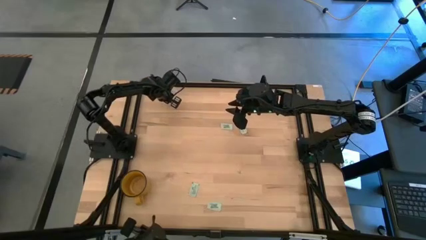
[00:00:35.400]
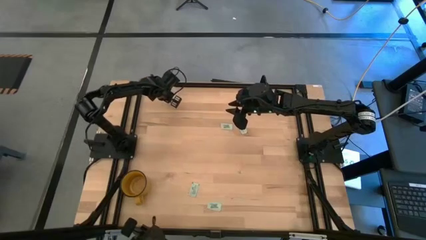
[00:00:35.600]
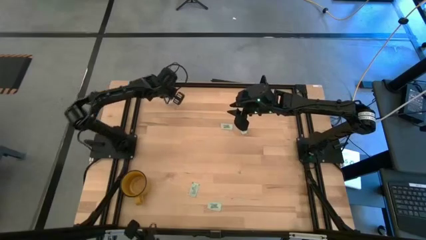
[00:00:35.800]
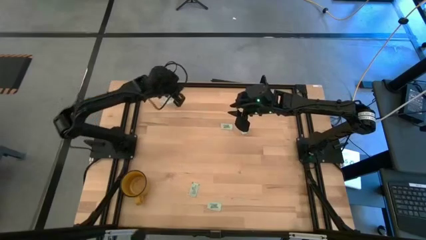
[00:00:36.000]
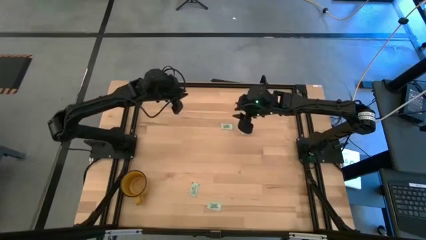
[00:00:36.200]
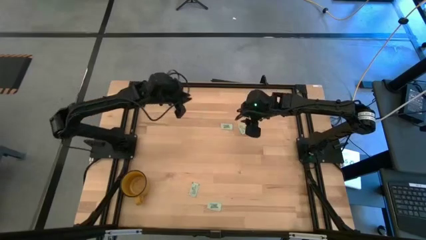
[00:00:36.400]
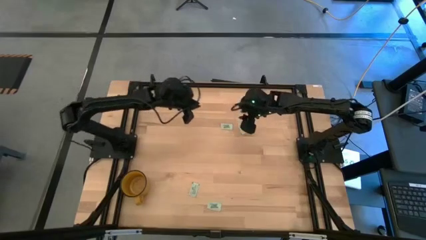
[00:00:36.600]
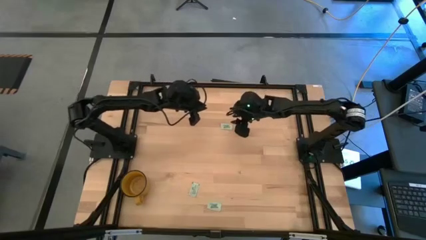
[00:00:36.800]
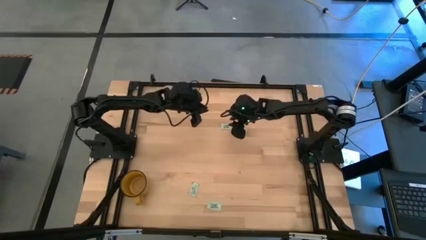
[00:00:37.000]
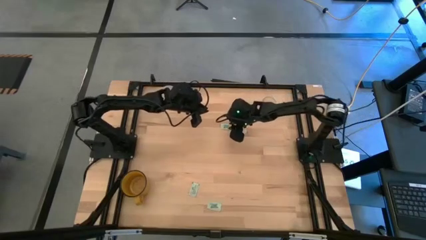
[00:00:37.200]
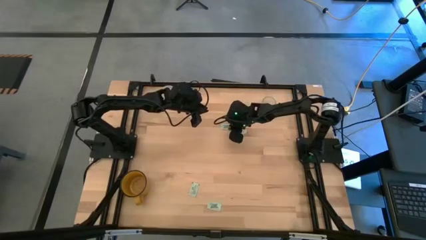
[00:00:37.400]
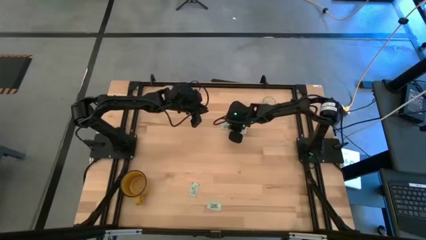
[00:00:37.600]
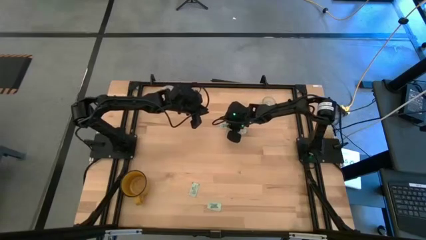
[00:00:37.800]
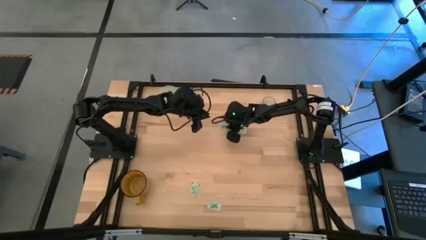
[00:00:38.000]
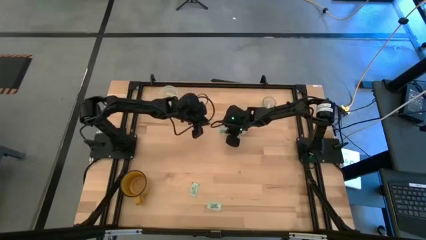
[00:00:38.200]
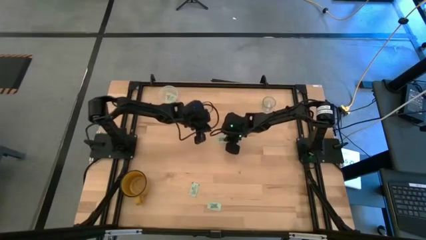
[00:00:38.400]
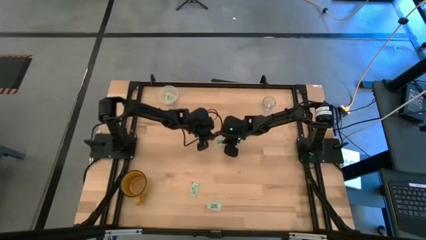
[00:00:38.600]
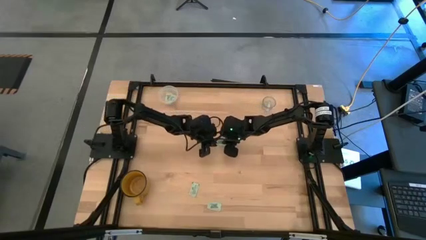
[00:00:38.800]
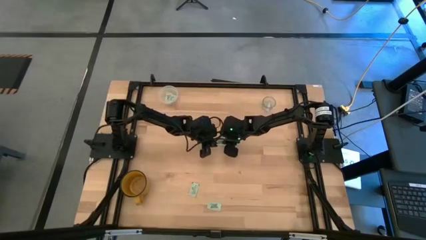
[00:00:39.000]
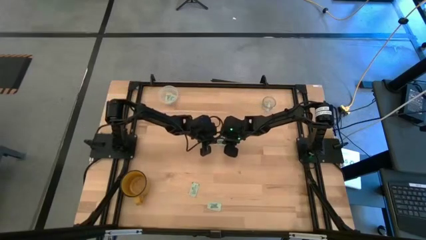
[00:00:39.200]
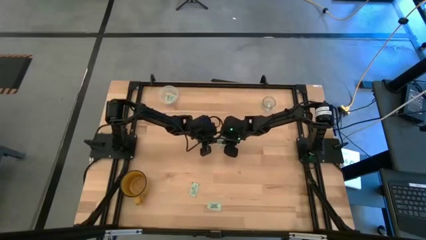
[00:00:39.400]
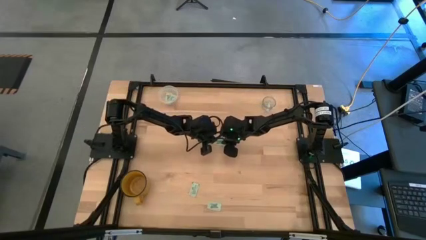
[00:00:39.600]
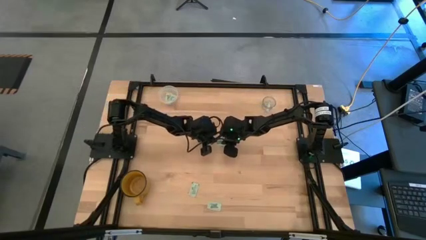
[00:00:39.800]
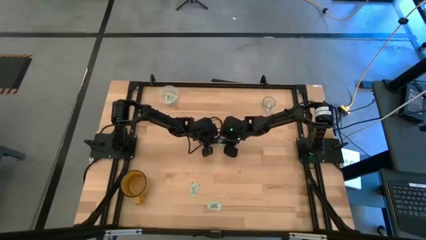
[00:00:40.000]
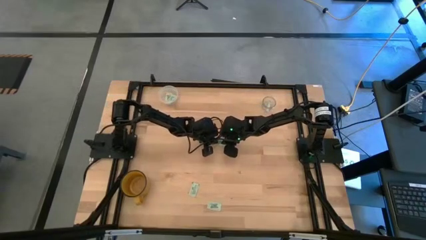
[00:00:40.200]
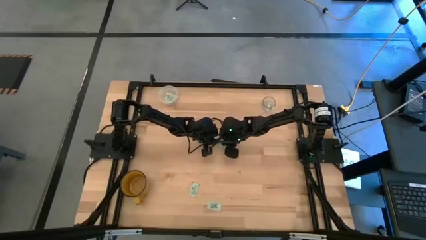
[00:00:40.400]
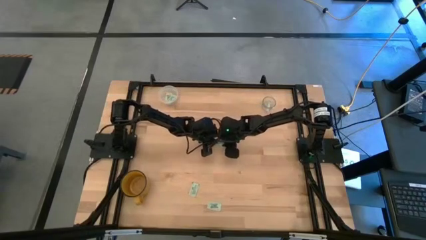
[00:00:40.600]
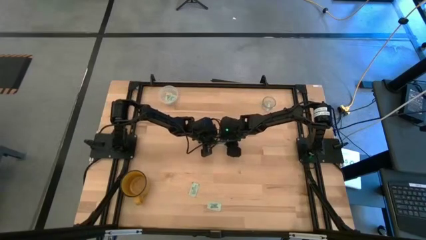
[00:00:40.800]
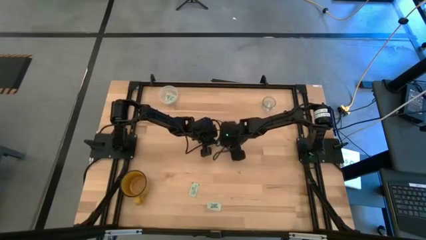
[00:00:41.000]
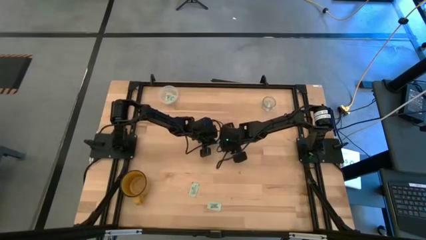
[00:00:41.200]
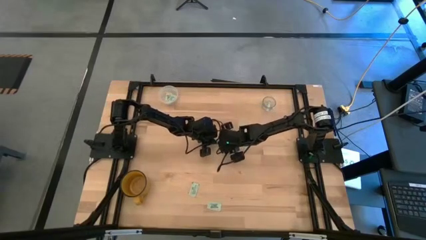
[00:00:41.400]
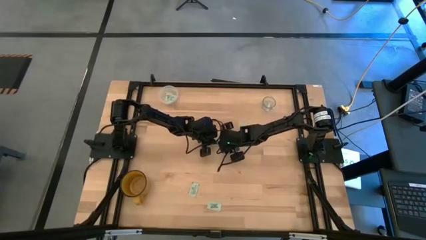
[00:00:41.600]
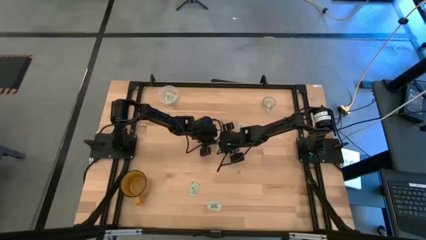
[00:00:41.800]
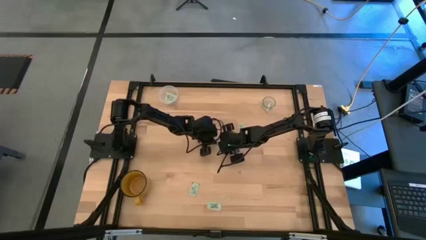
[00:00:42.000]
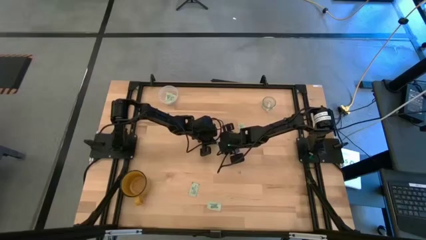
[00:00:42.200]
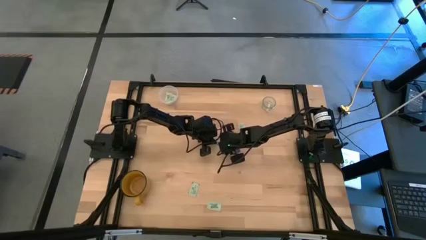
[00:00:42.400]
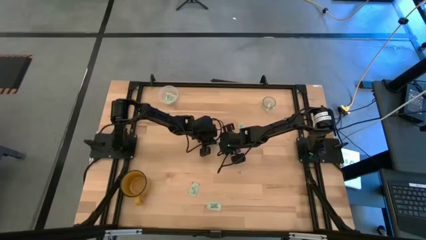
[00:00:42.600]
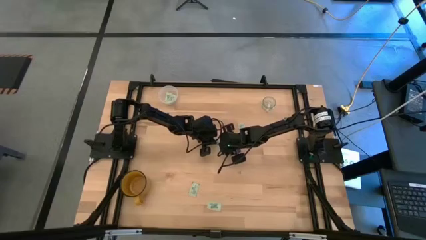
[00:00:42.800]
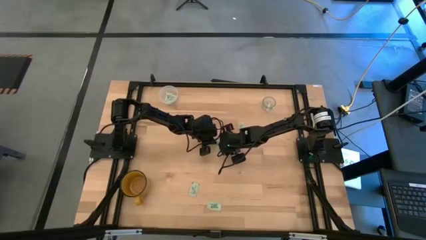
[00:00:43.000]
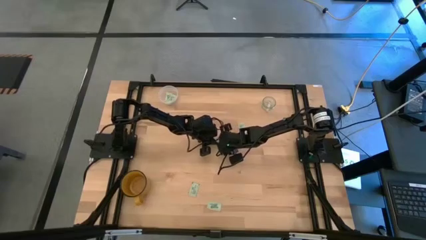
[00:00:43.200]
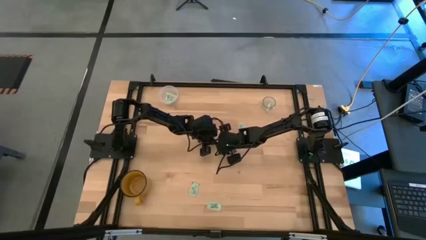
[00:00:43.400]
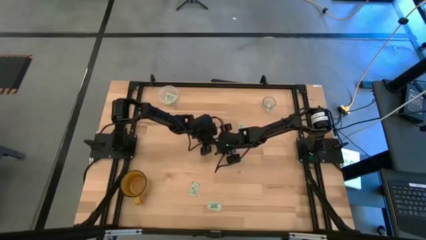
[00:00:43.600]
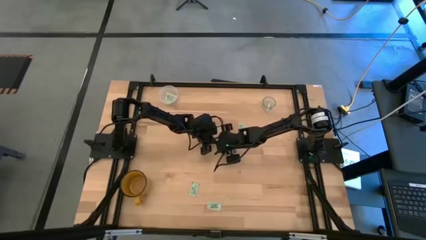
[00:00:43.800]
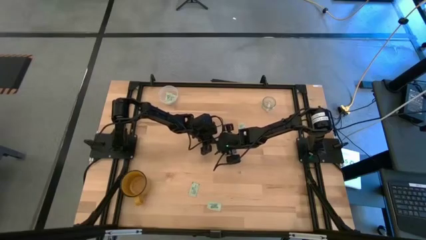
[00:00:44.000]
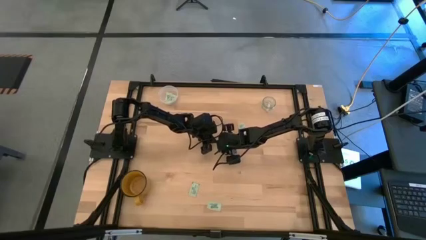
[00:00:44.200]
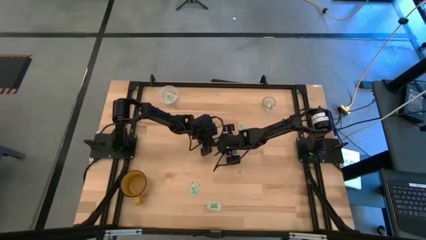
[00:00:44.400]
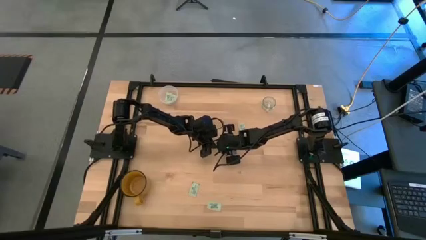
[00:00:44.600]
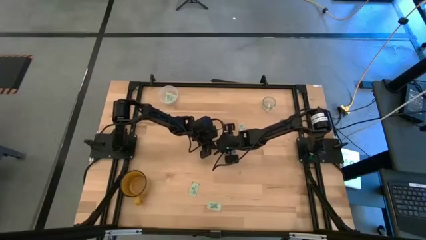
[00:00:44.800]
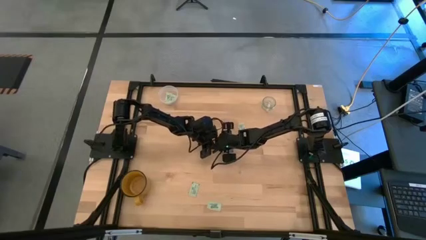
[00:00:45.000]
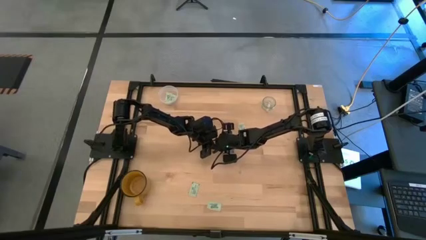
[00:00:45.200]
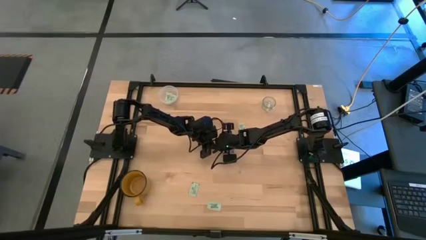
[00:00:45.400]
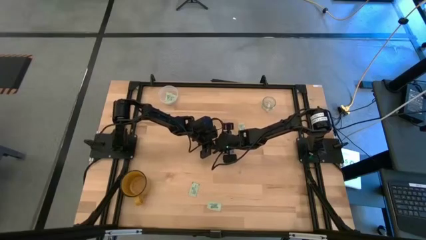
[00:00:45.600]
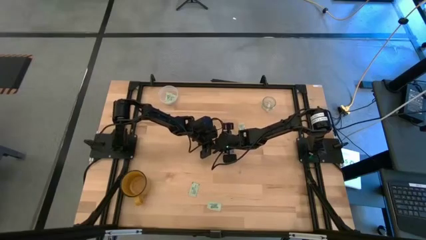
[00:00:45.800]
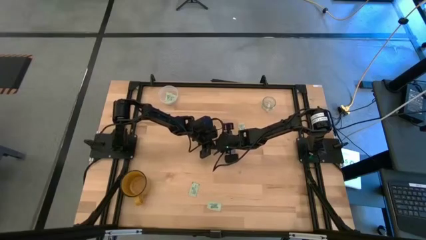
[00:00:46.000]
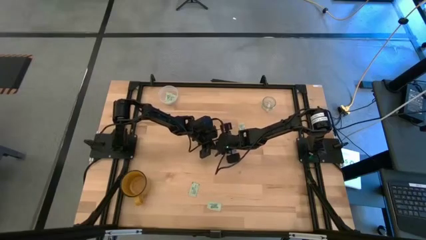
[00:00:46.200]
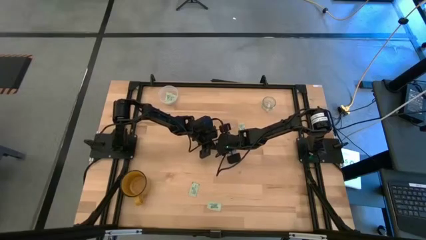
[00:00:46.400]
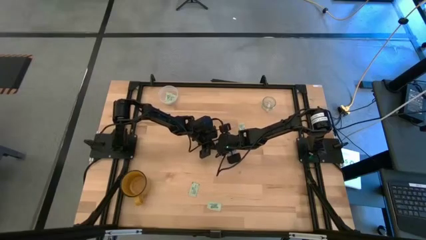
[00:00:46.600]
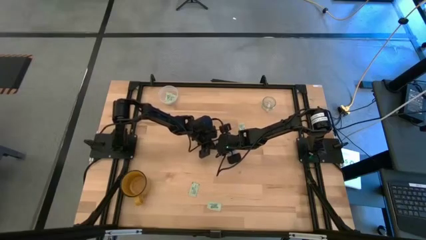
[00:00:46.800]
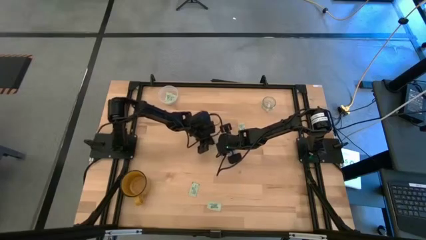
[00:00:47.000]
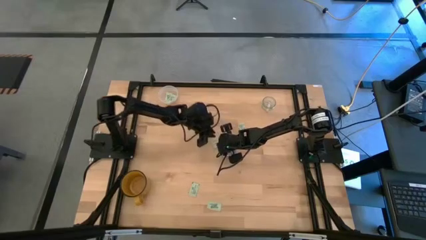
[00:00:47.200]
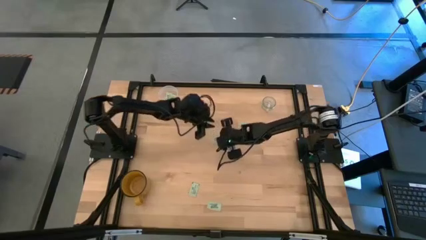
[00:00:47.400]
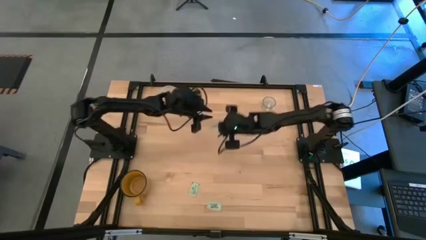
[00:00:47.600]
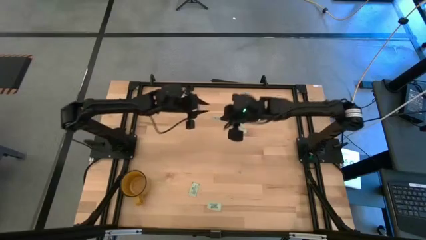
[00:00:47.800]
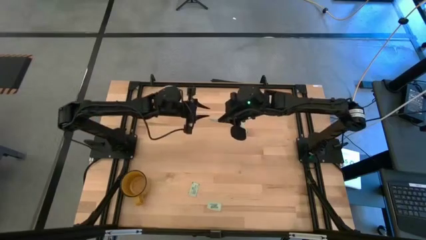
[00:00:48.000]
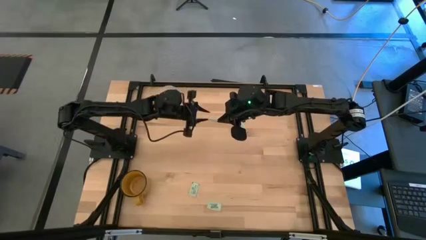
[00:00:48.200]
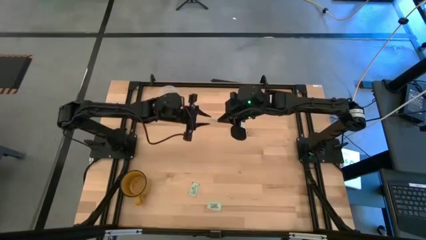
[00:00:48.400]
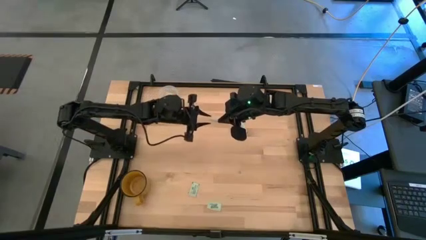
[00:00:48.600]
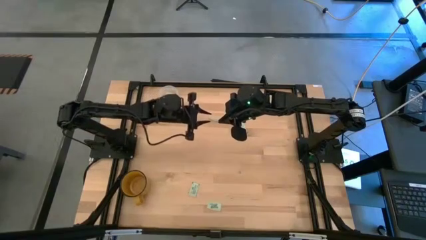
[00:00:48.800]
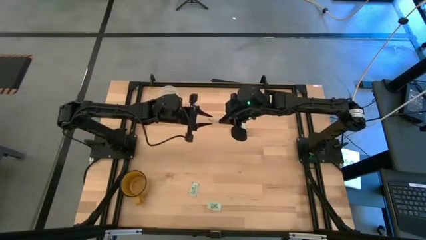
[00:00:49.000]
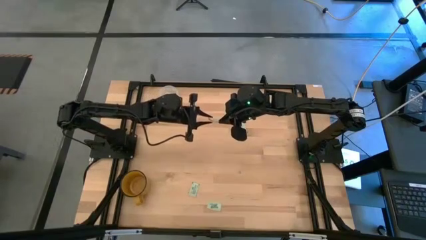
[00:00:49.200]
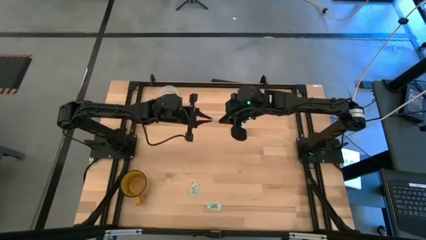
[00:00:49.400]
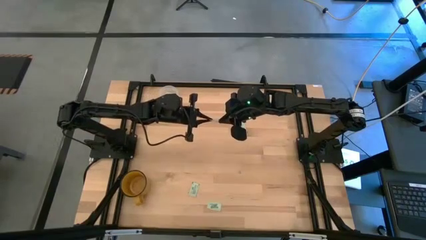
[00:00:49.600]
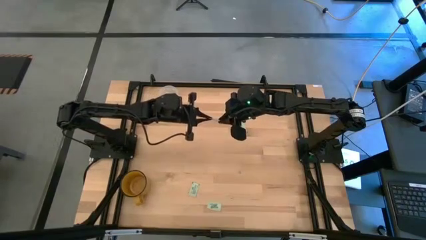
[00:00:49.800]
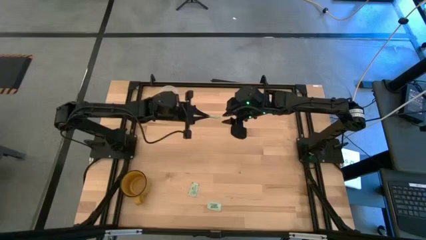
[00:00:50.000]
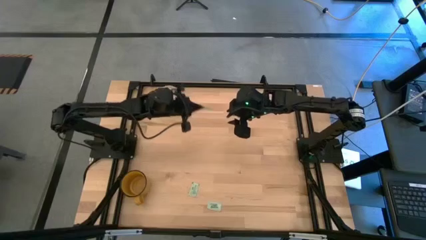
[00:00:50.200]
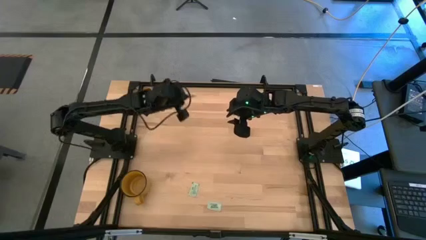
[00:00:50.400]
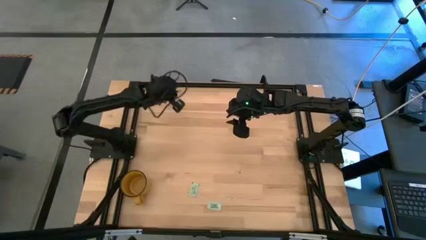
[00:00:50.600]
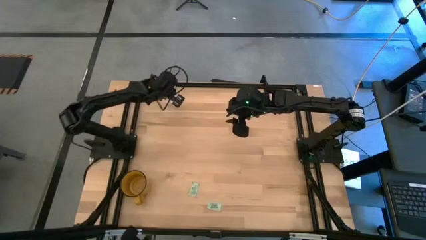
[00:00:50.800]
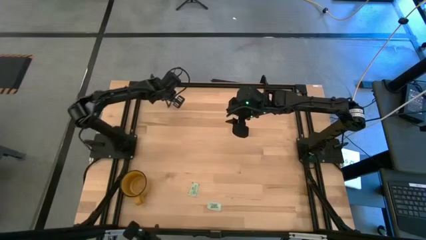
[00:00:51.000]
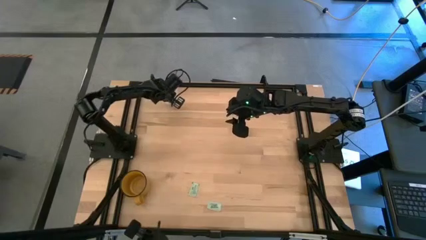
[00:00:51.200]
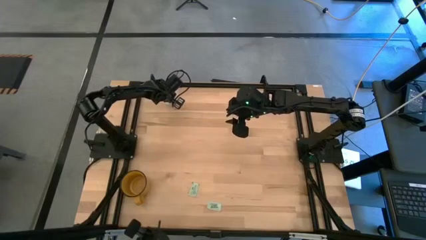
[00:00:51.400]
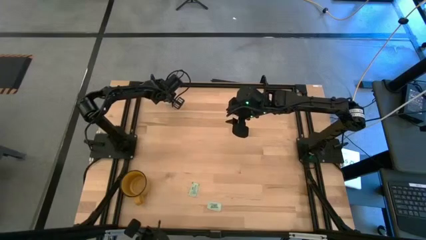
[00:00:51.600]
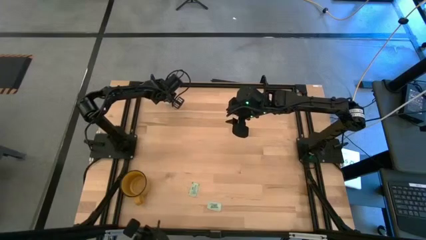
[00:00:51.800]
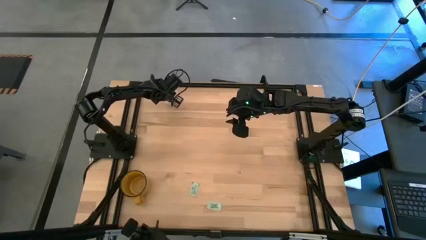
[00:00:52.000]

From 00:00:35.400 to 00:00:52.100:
Task: Pick and place Stevia / Truvia into bins
Put the green stevia packet into the transparent container
